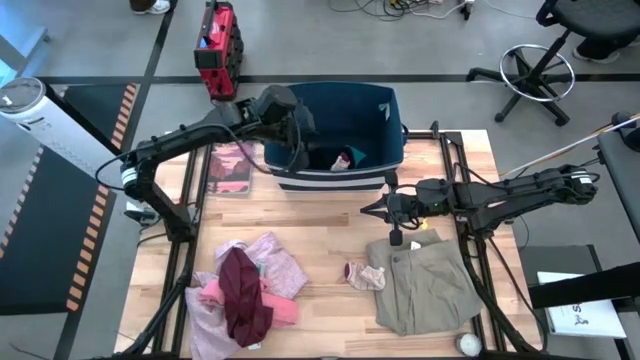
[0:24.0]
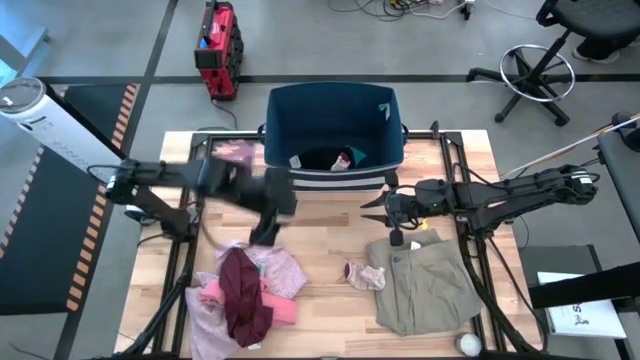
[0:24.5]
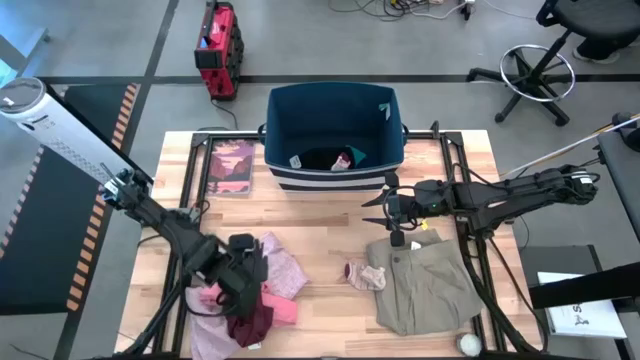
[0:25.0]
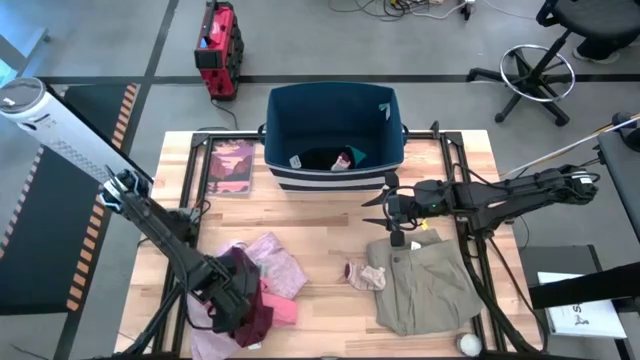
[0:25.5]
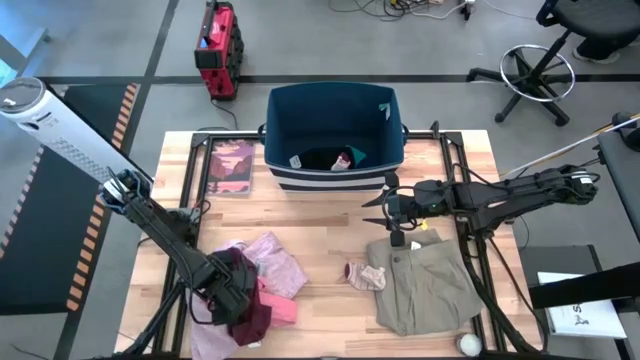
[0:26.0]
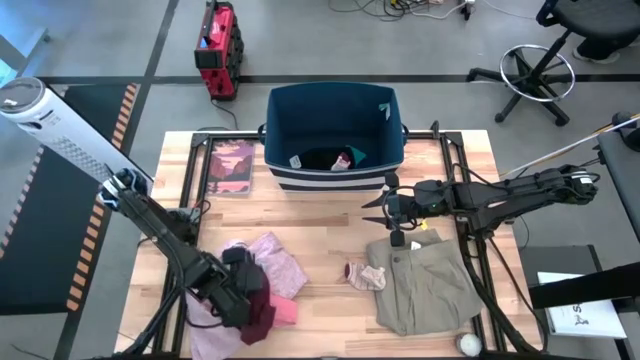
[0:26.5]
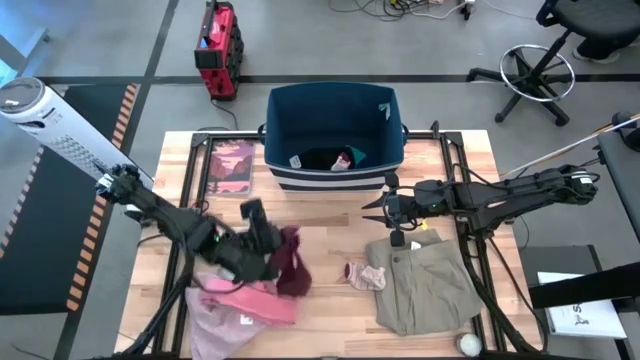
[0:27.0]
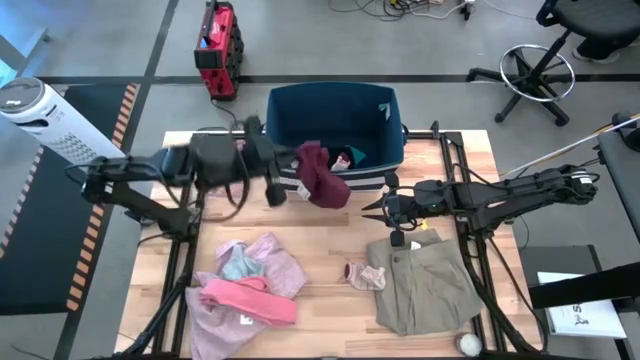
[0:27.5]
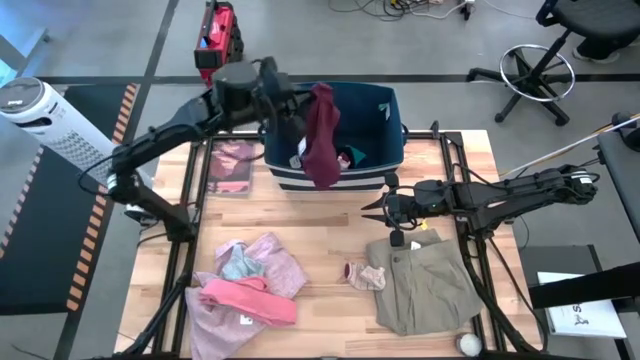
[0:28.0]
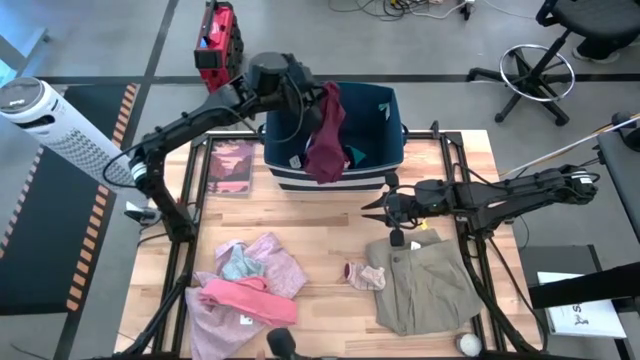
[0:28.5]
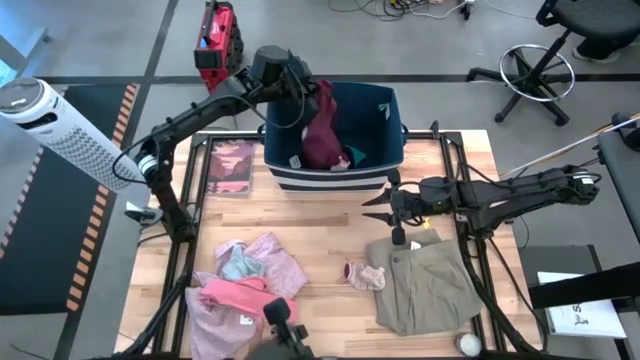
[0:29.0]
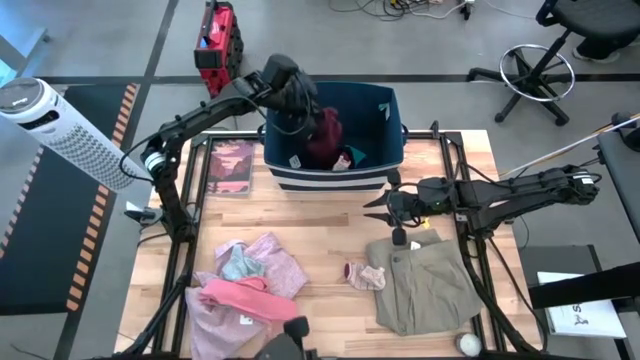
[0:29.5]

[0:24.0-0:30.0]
Task: Sort clothes
Put the red underwear into the blue laundry bin

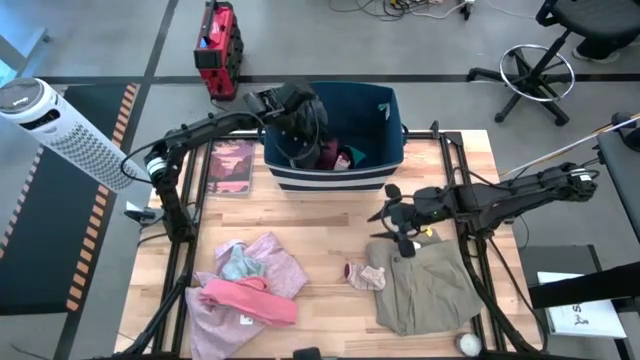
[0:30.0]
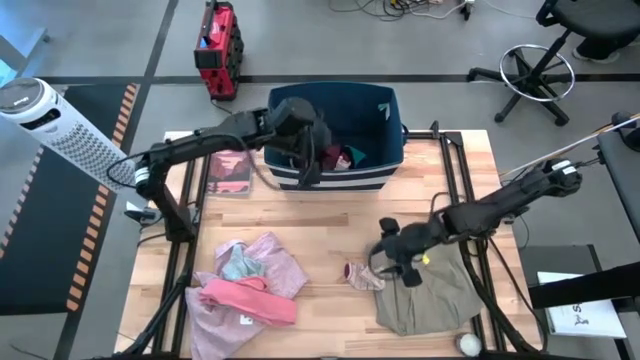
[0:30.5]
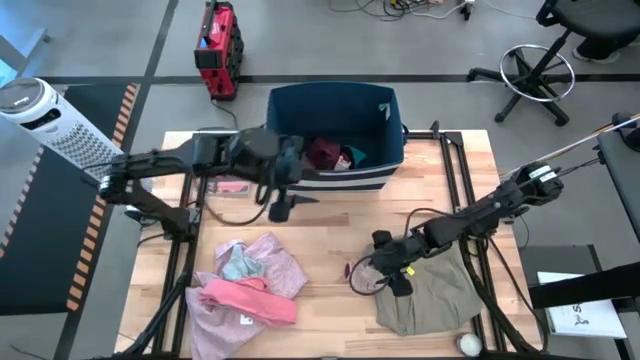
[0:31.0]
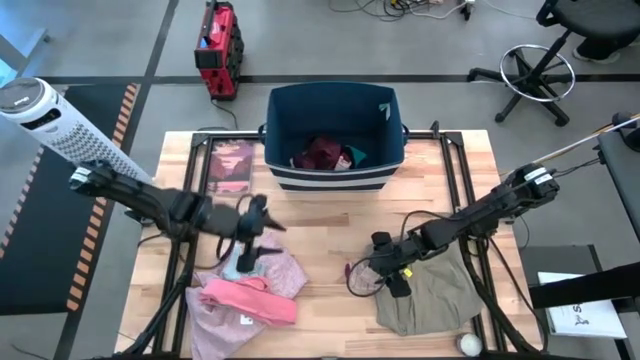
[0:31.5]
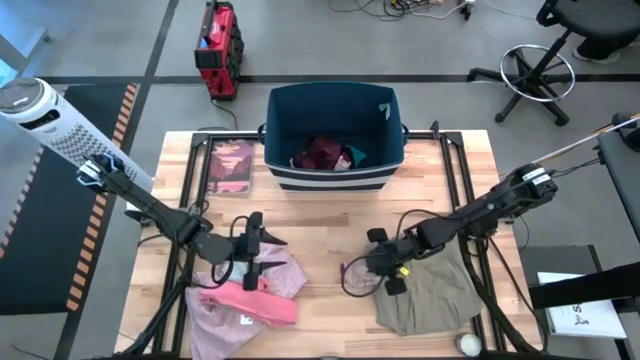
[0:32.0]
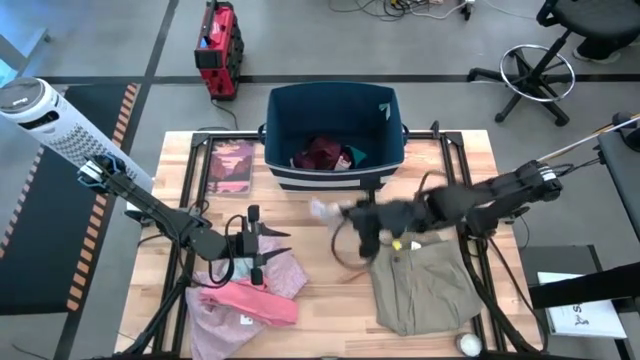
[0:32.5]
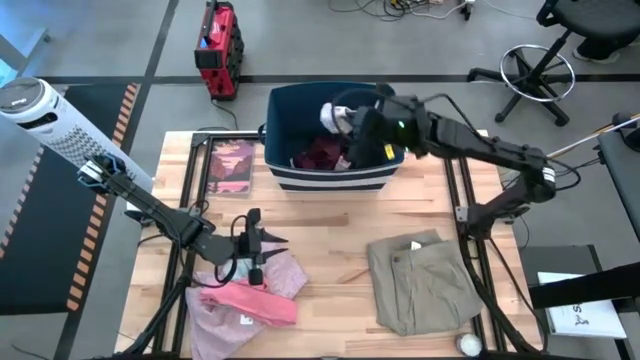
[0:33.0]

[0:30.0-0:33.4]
Put the light brown sock into the blue laundry bin

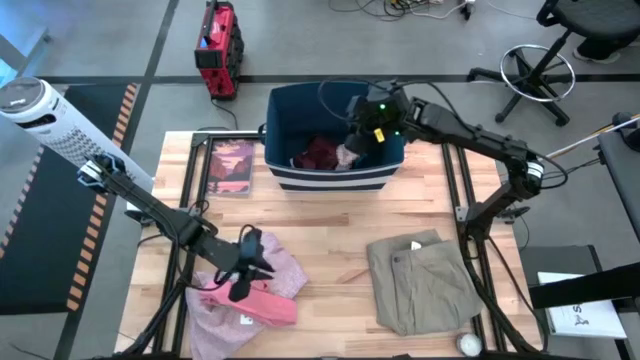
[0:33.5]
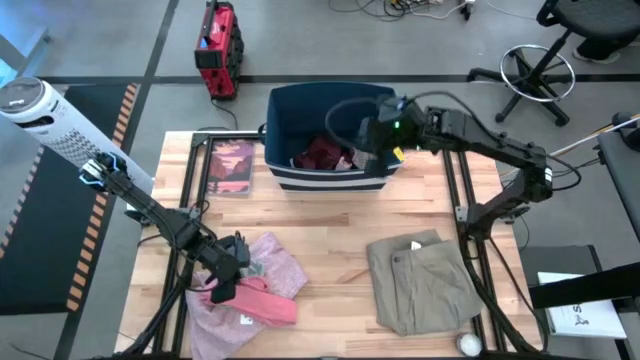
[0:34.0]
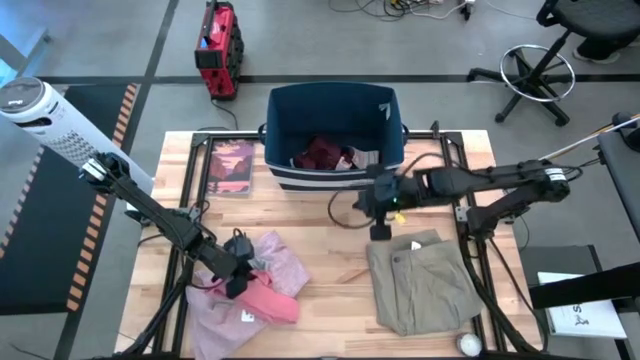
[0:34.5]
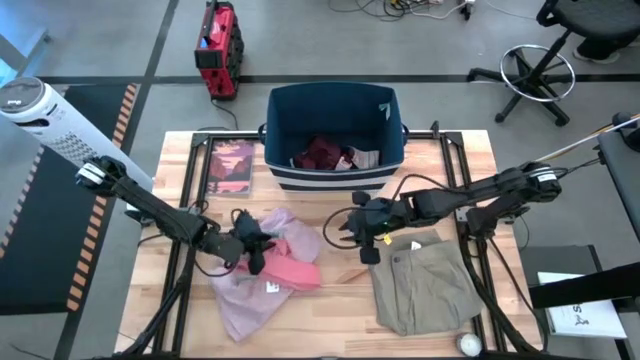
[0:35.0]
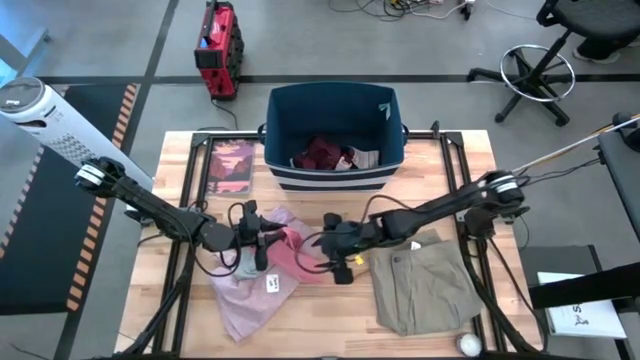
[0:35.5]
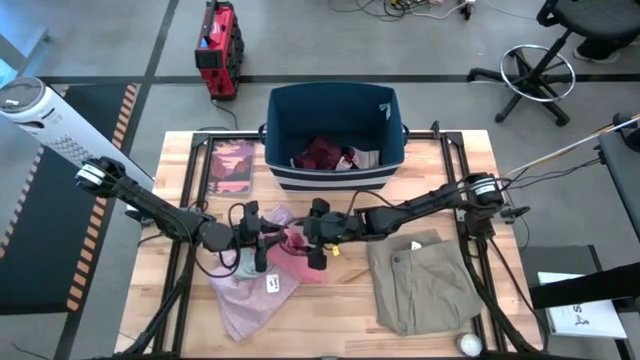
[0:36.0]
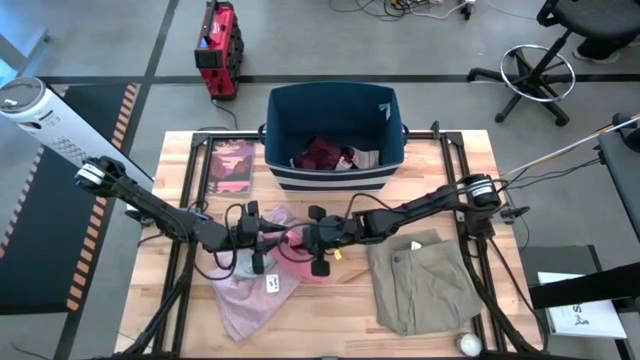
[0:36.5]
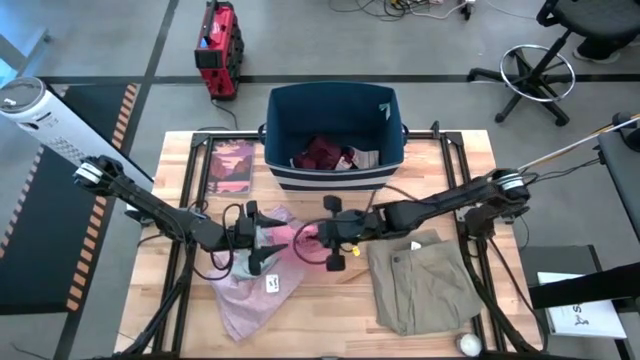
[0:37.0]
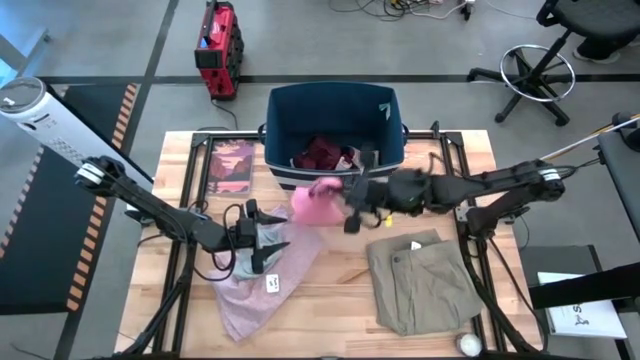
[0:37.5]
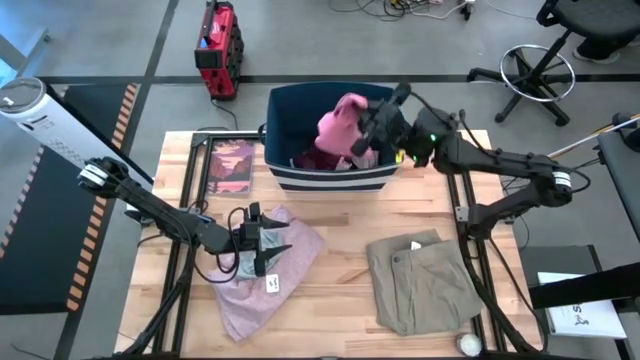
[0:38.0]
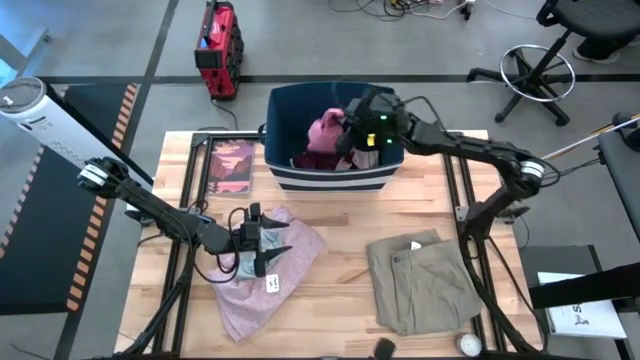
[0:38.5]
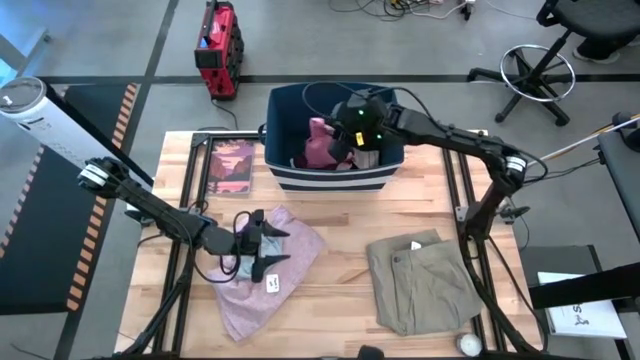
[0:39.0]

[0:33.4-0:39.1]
Put the pink underwear into the blue laundry bin

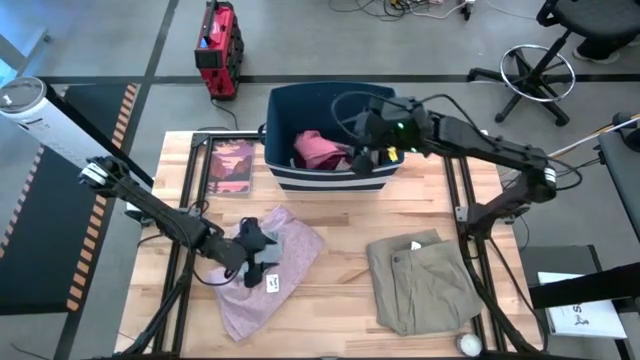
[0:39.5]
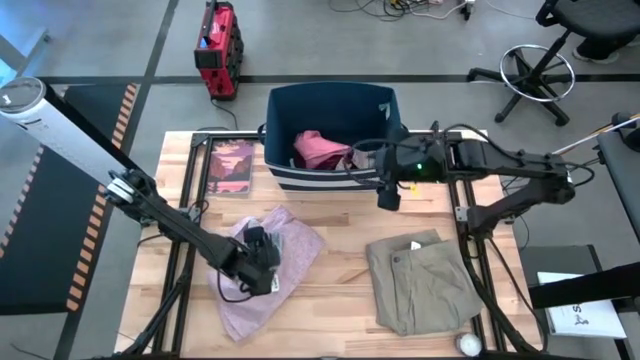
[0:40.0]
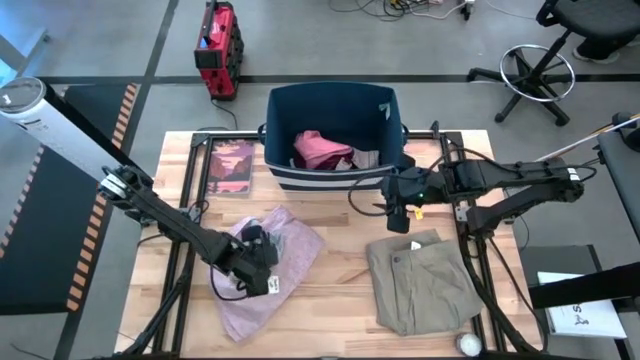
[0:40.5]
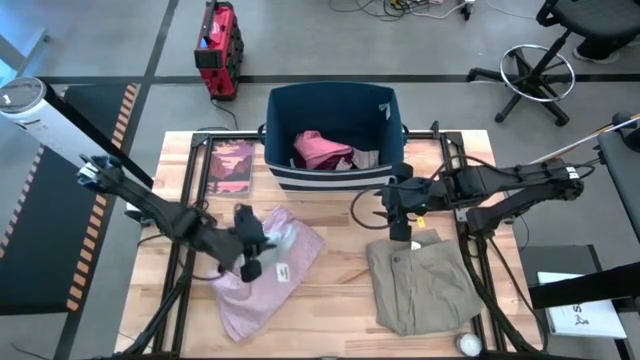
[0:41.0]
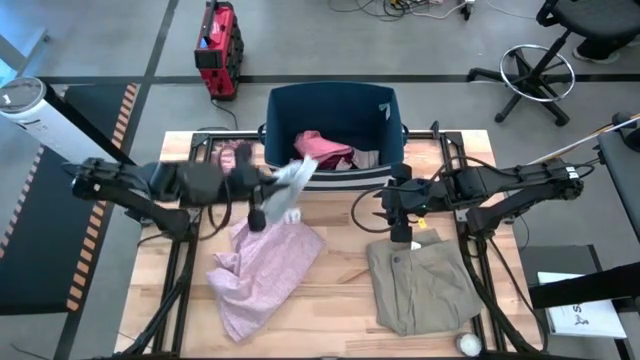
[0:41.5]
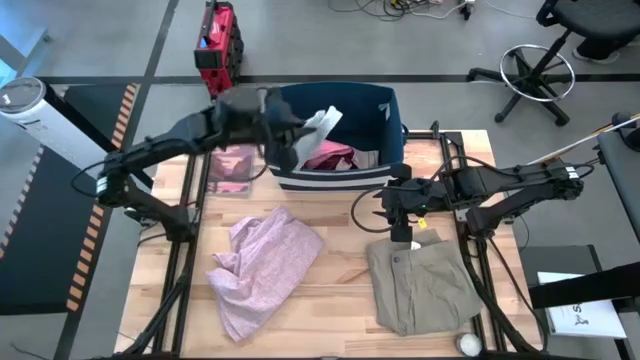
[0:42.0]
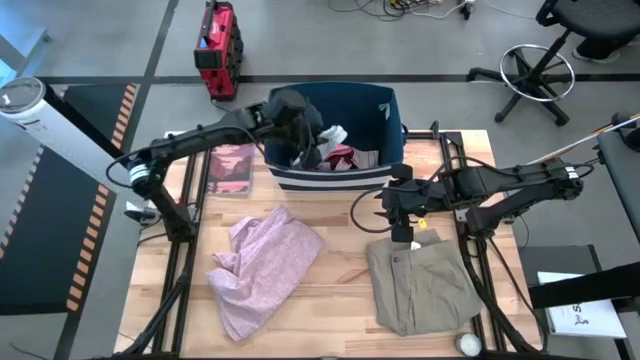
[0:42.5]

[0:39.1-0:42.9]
Put the gray underwear into the blue laundry bin

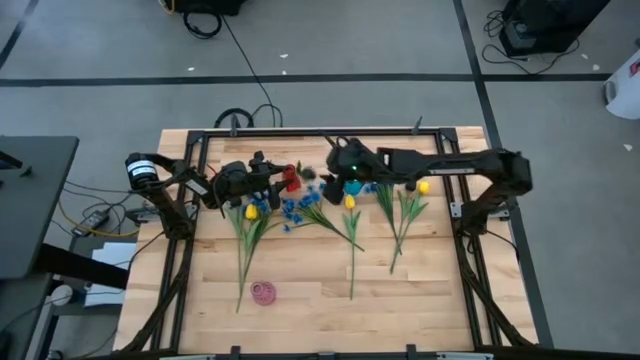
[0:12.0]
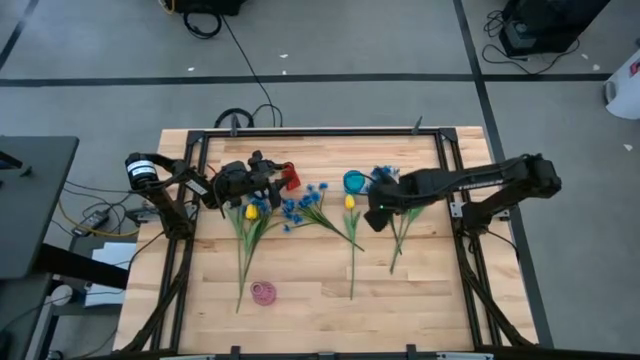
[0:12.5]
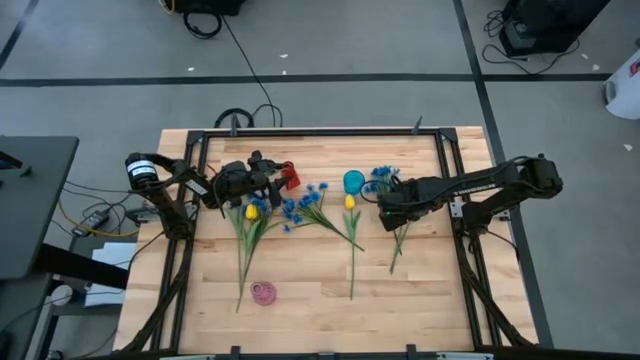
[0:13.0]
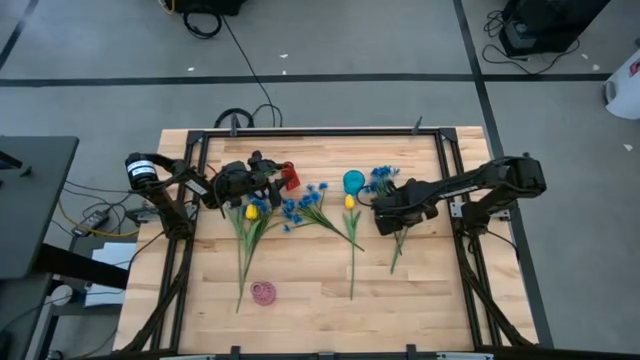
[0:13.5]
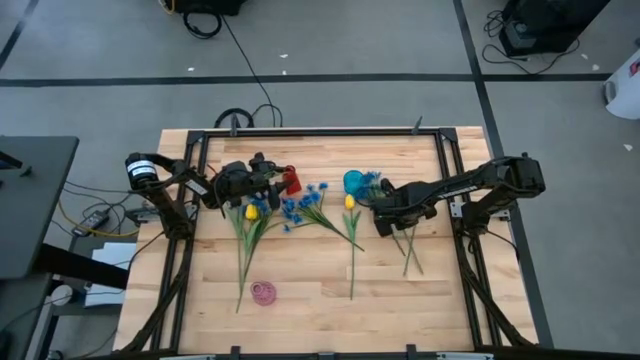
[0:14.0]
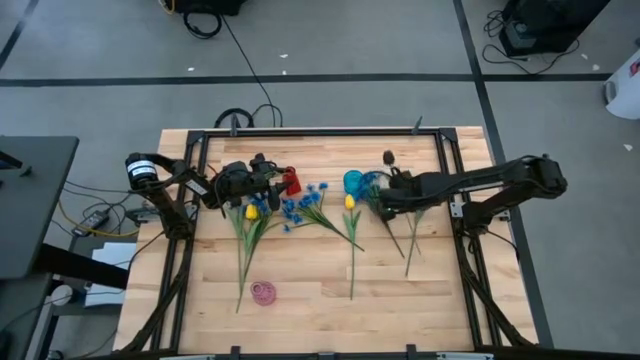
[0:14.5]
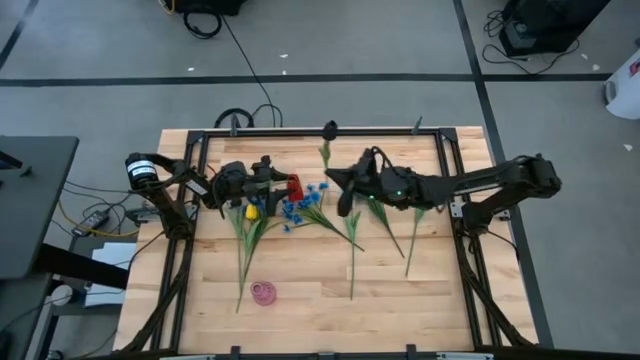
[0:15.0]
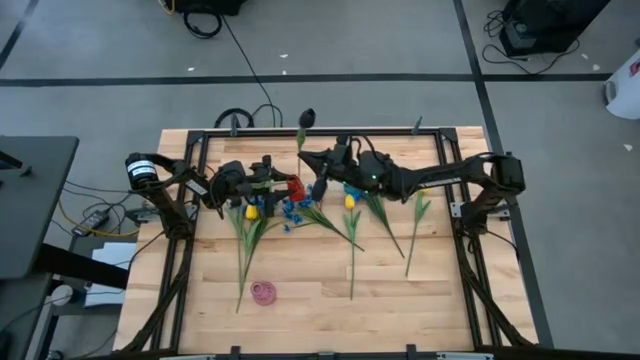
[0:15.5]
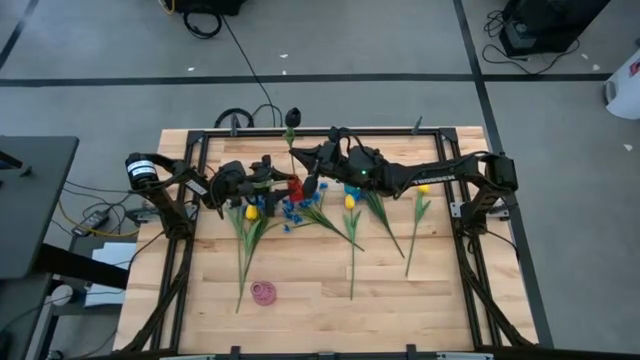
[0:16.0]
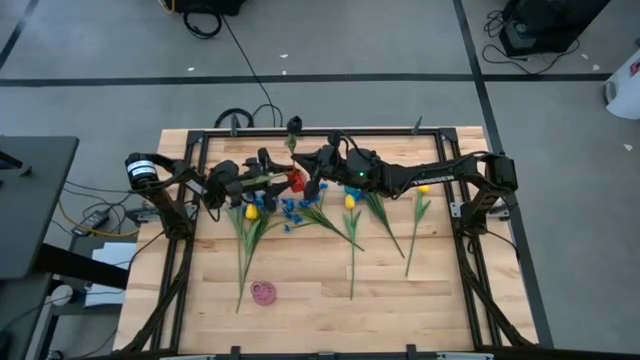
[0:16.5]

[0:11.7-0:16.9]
Task: Sort flowers into vase by color
Put the right black tulip into the red vase
